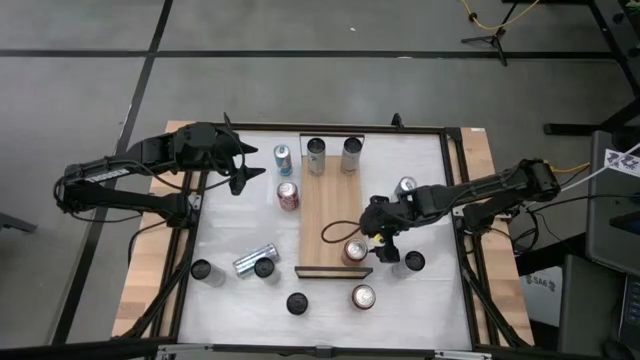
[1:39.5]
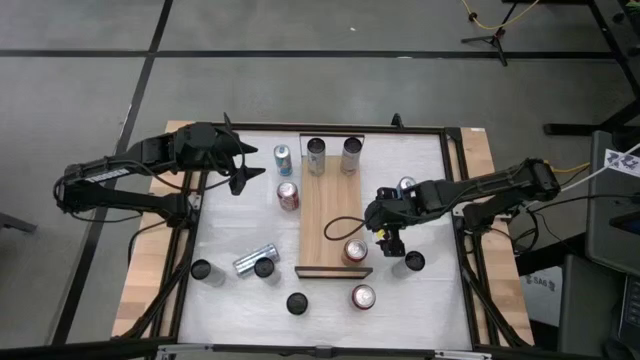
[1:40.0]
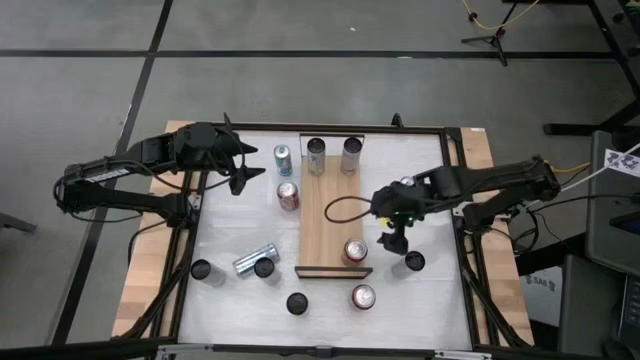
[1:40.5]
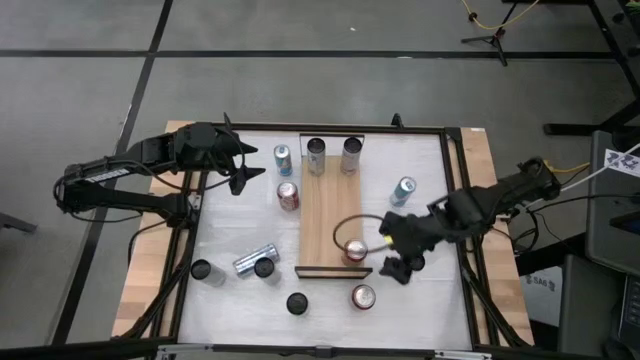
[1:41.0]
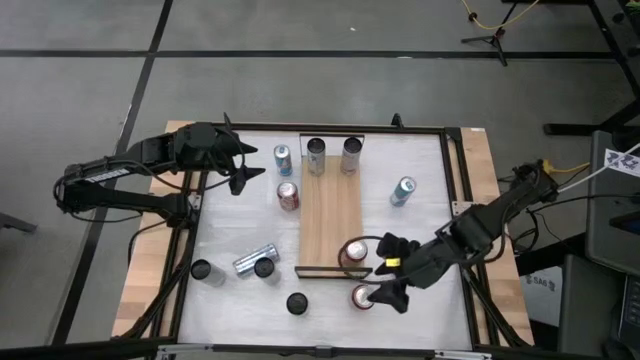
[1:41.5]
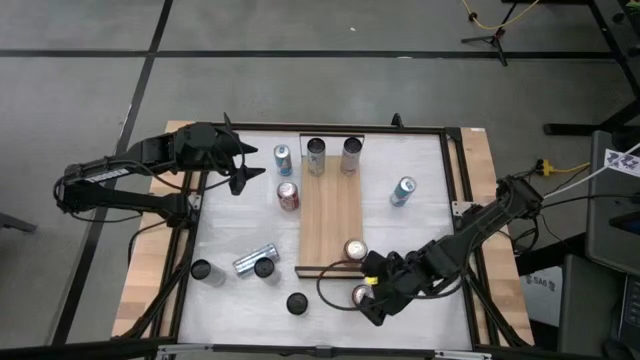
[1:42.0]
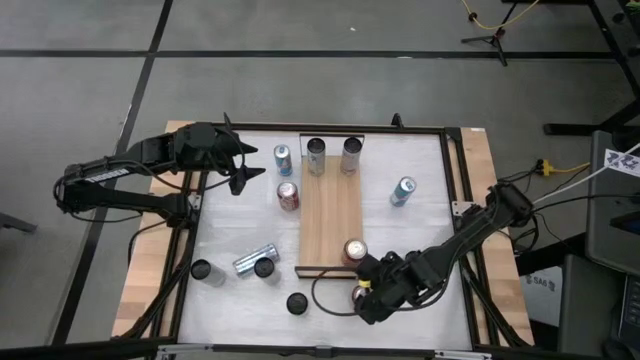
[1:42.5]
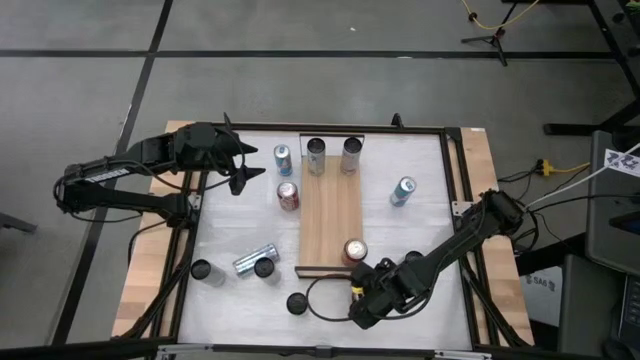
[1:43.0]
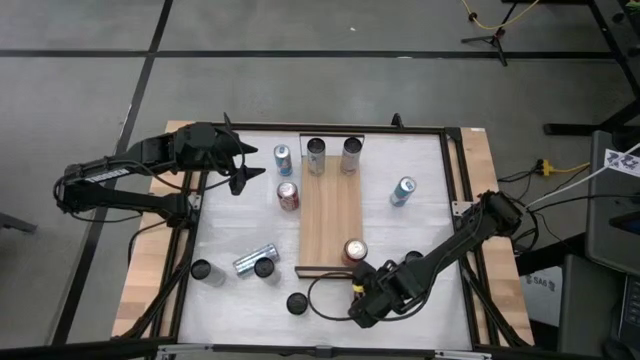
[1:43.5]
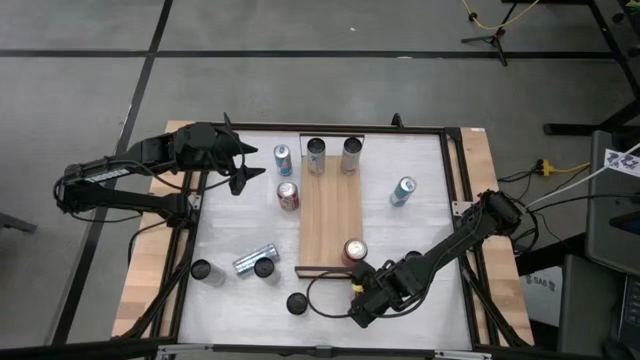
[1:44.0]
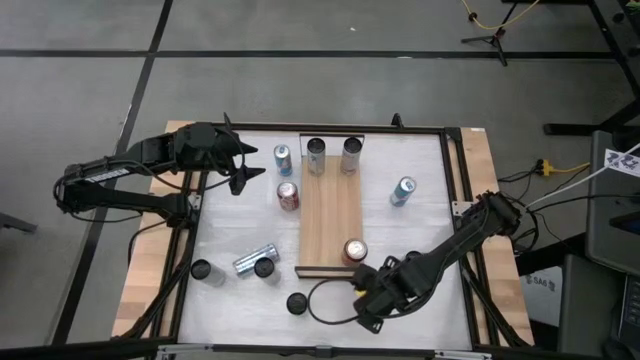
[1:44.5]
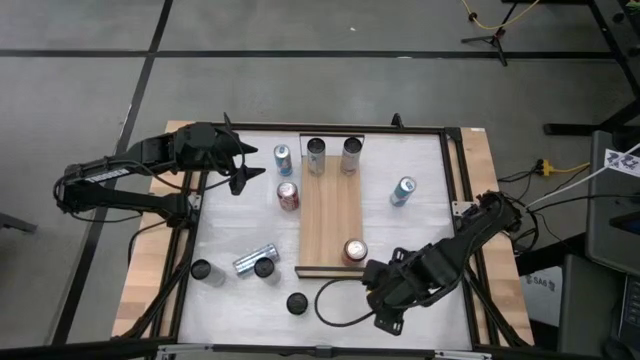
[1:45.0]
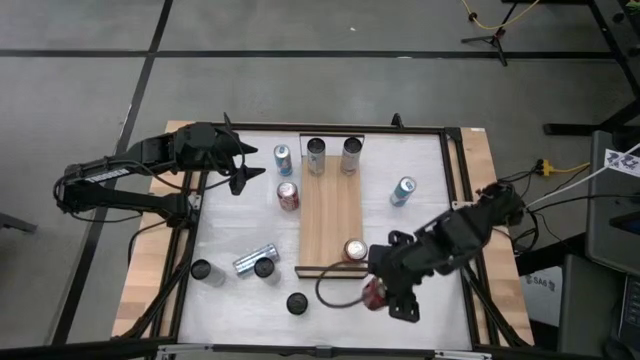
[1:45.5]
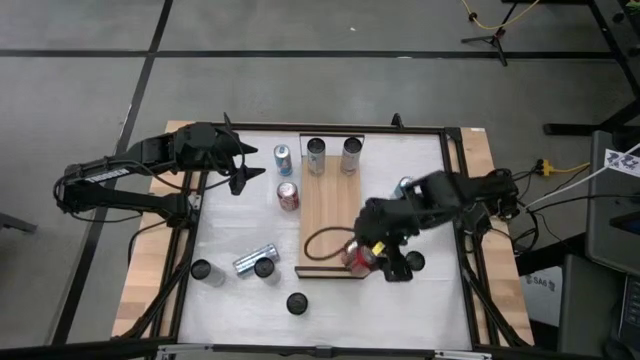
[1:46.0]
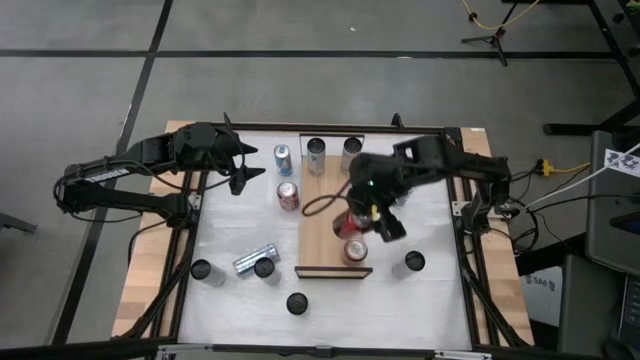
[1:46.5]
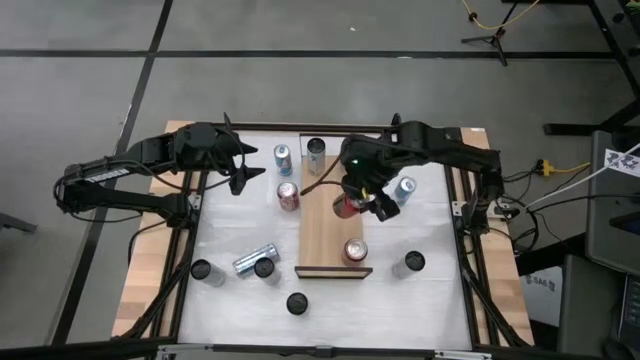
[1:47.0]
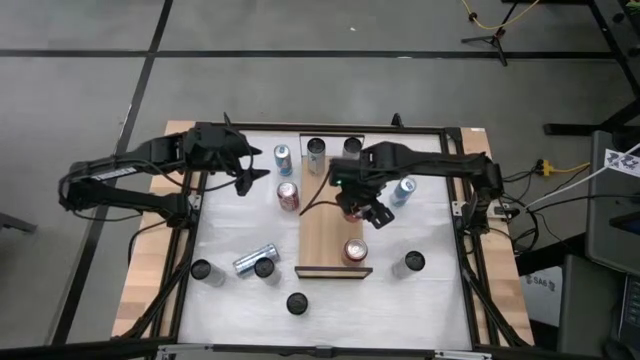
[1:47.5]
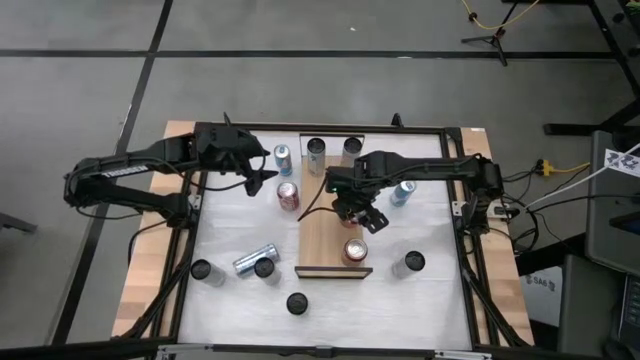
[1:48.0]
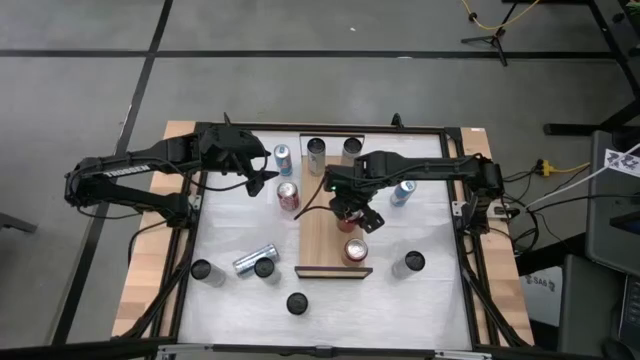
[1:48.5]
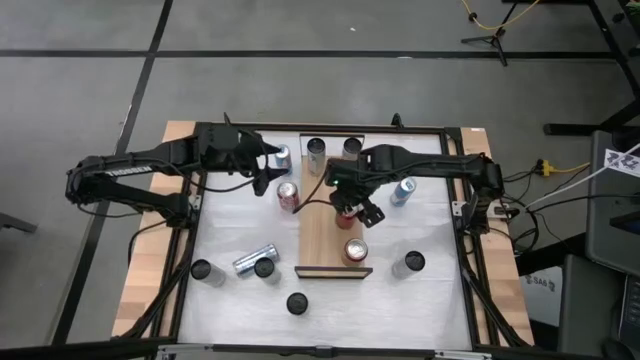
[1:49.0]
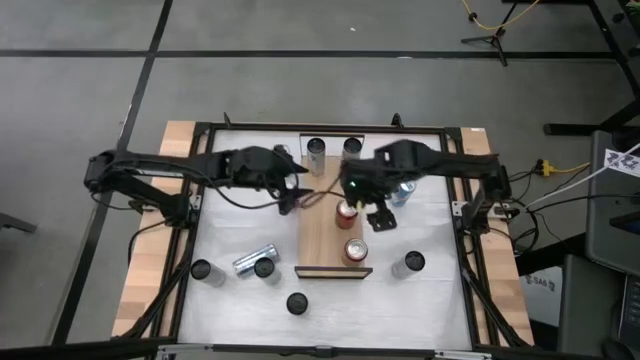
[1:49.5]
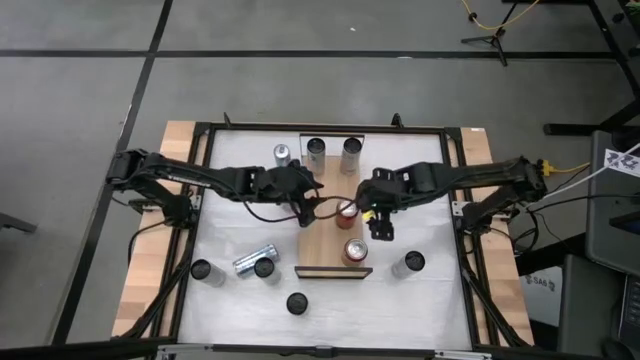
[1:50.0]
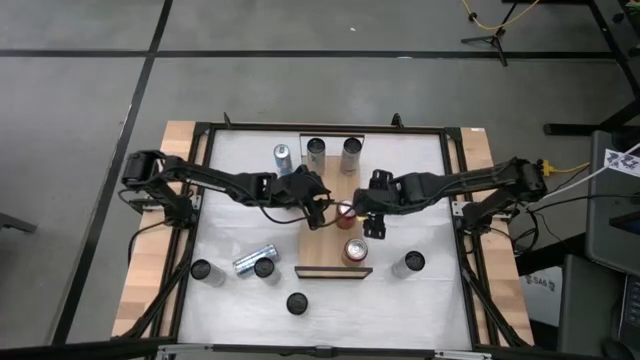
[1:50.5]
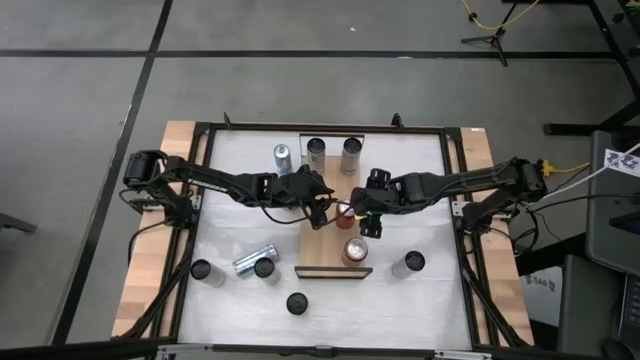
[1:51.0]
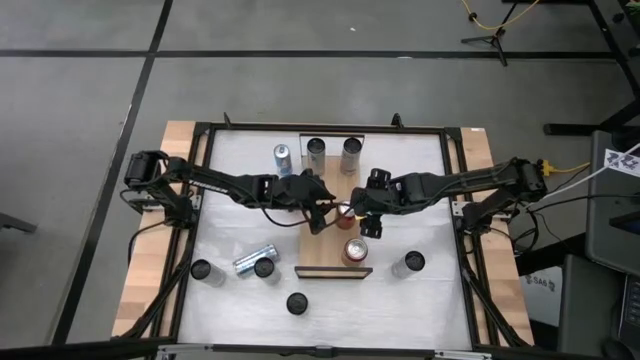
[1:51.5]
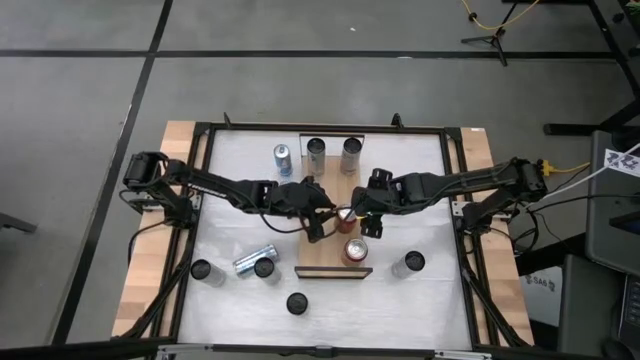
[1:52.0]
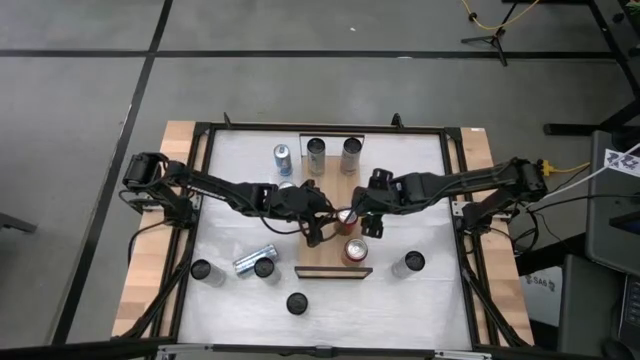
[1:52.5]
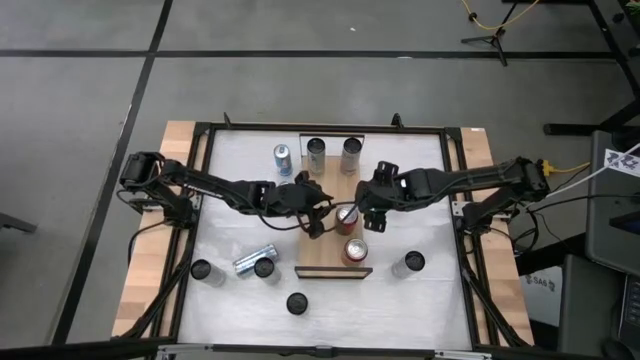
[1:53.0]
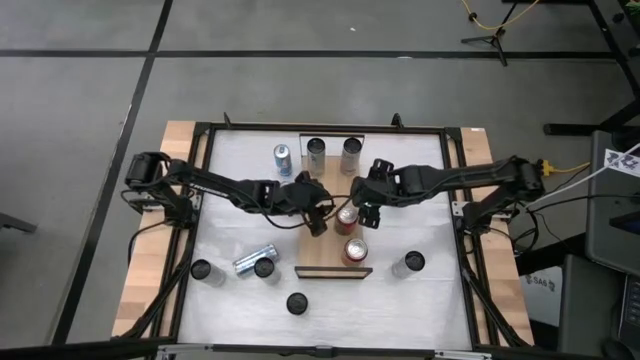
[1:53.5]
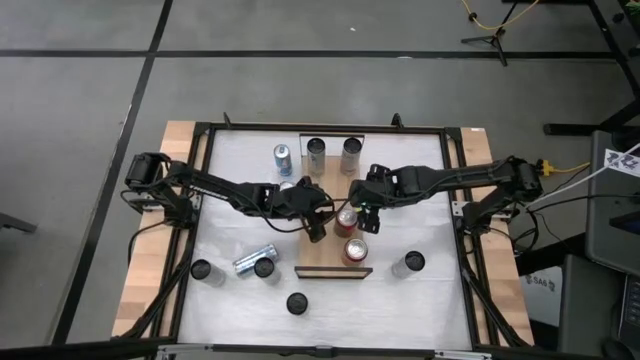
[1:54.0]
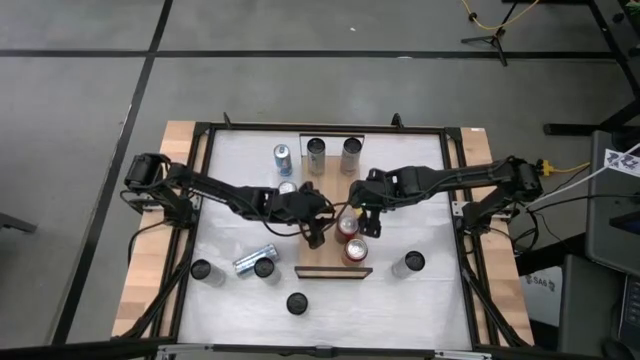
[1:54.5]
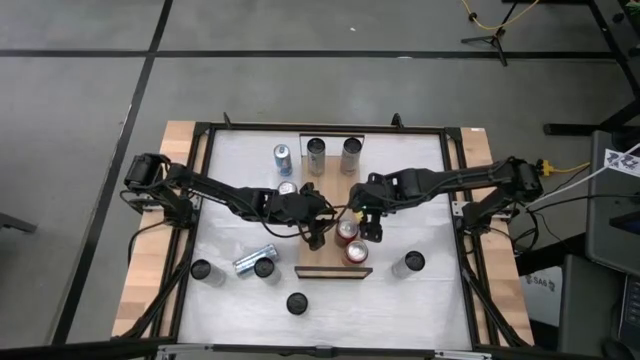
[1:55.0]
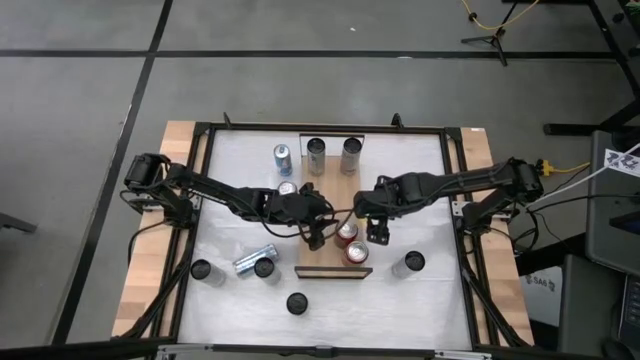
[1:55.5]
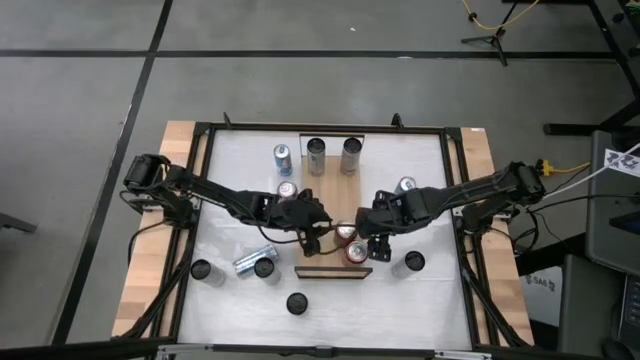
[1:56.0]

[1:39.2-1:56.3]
Task: Place canned beverage on shelf
Put the red black soda can on the shelf aligned with the other red black soda can

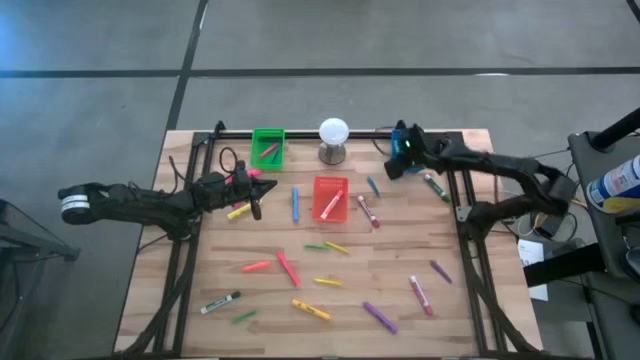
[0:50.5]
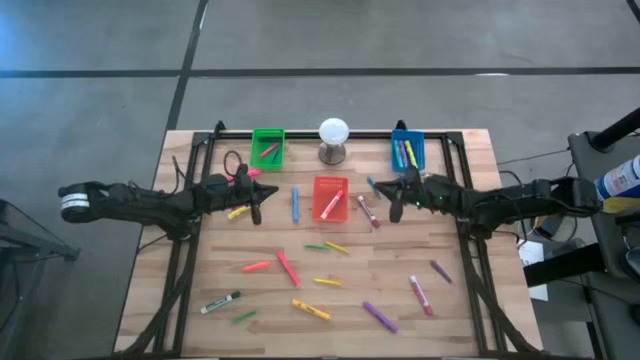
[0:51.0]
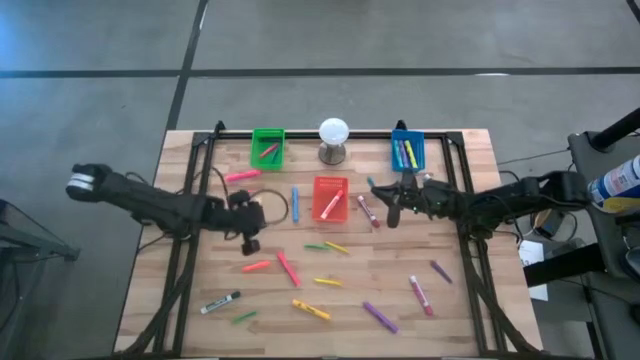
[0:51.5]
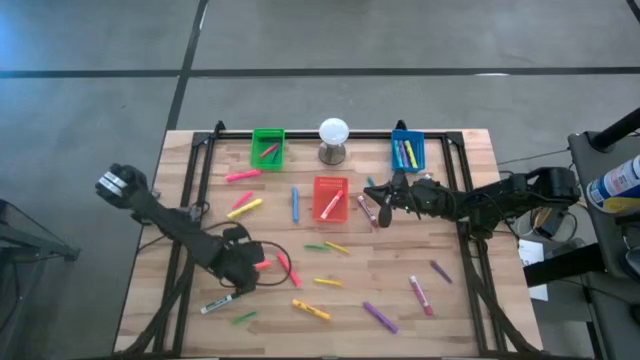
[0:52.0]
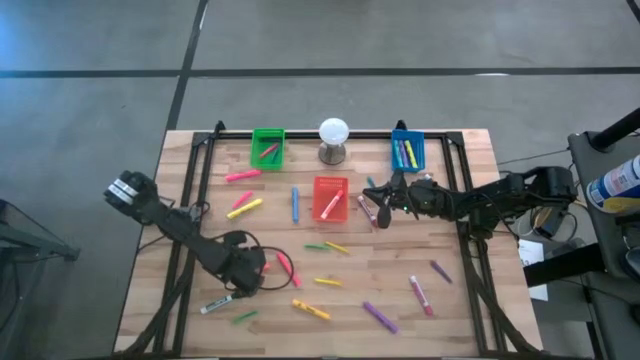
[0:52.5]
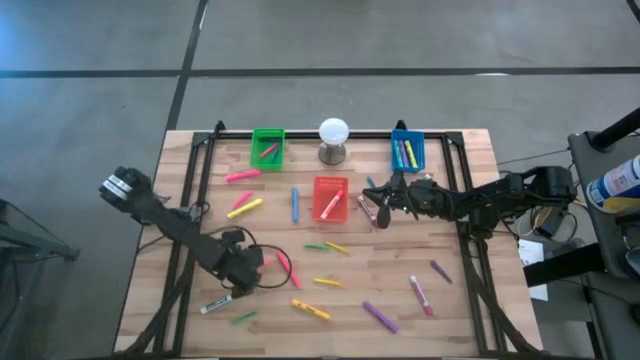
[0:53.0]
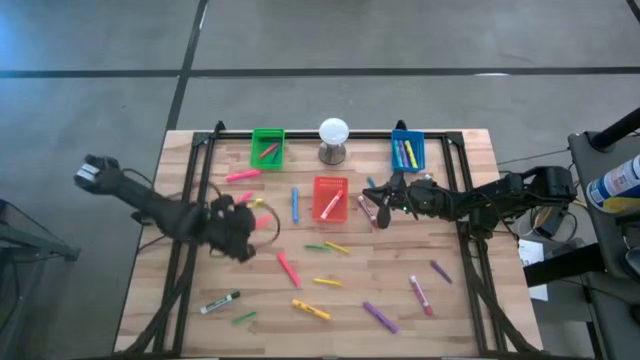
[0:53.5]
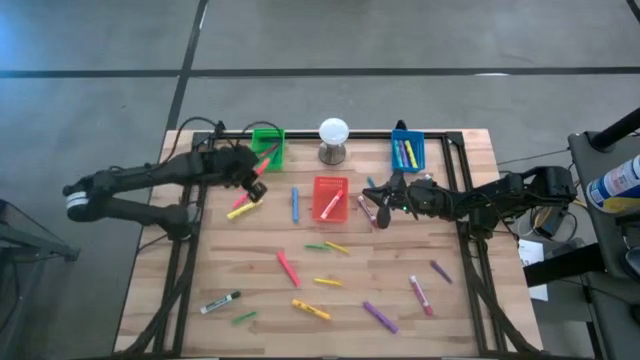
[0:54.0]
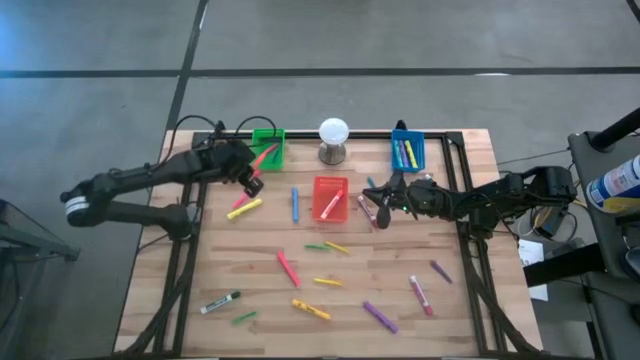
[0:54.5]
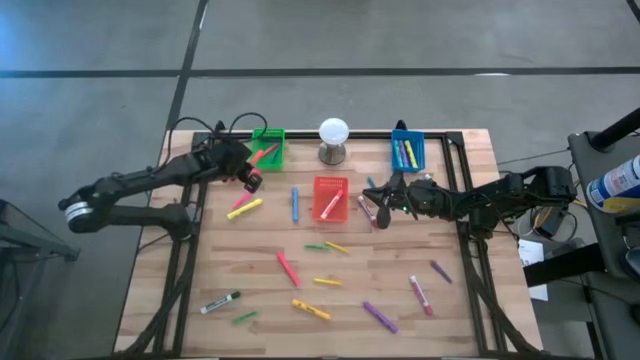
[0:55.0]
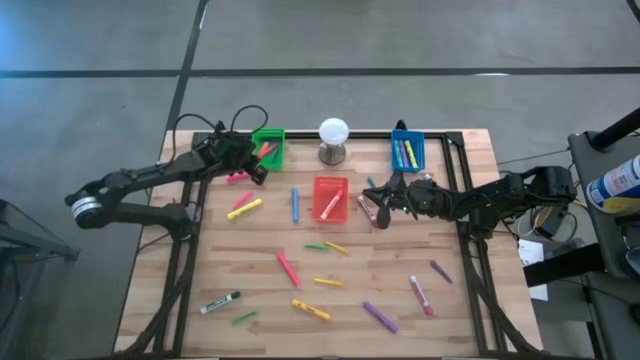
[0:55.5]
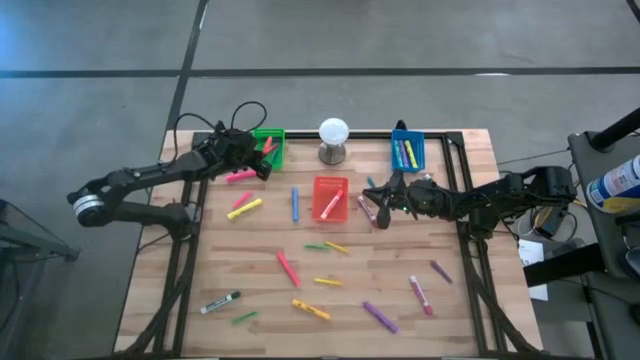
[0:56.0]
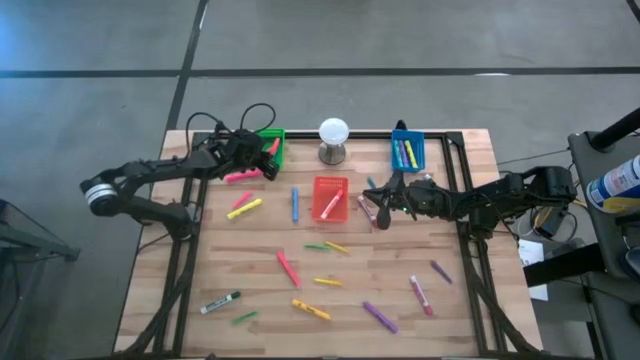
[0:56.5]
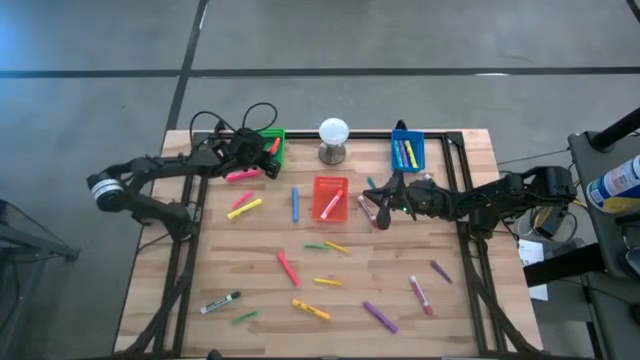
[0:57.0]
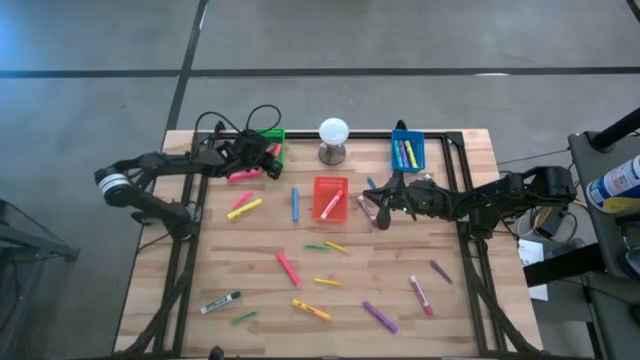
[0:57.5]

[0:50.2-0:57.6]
Task: Pick & Place Markers
Put the orange pen into the green bin
